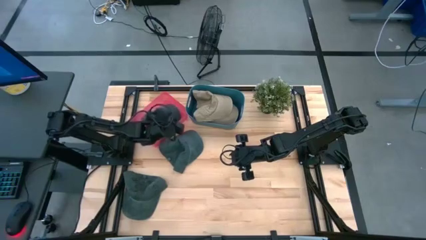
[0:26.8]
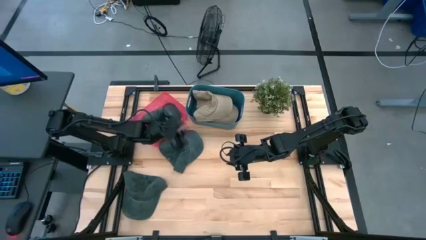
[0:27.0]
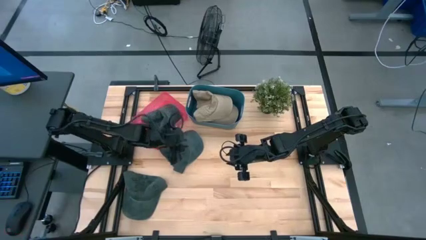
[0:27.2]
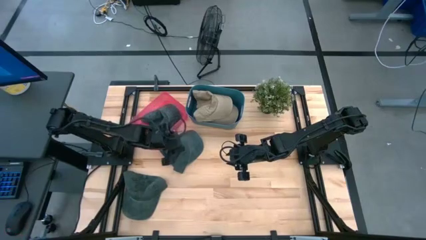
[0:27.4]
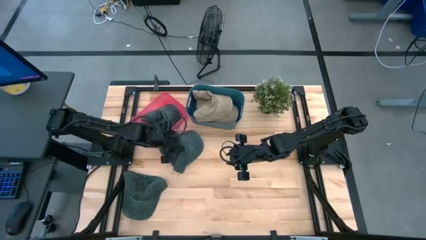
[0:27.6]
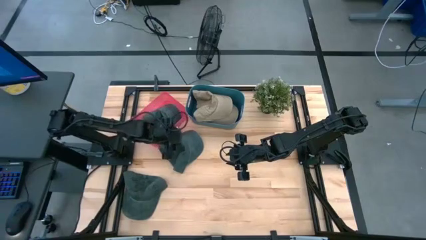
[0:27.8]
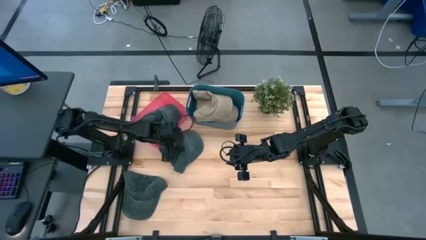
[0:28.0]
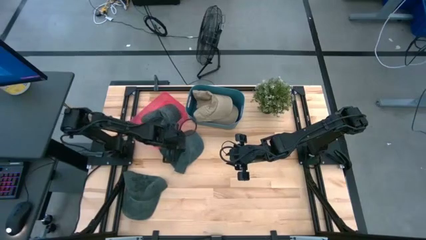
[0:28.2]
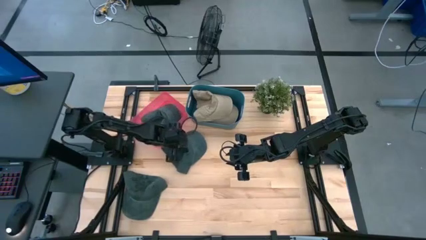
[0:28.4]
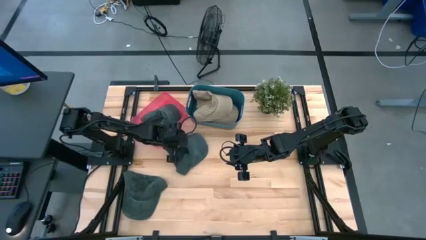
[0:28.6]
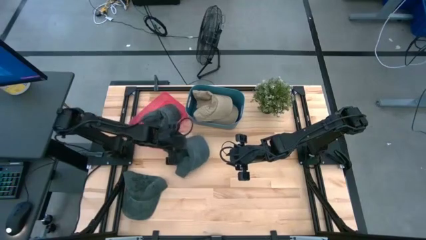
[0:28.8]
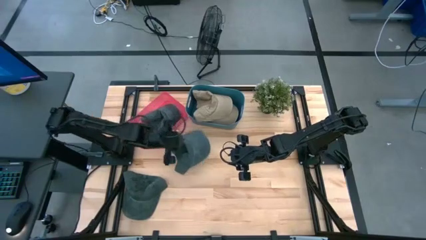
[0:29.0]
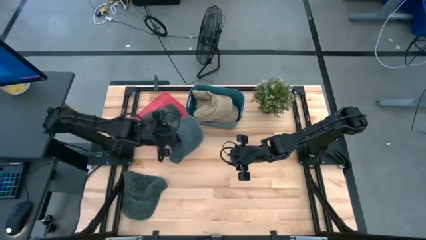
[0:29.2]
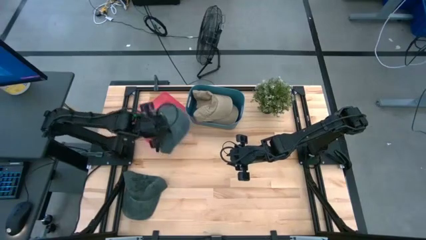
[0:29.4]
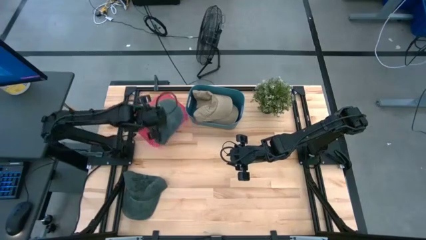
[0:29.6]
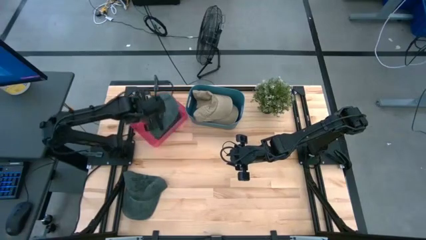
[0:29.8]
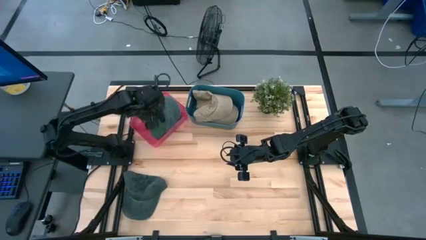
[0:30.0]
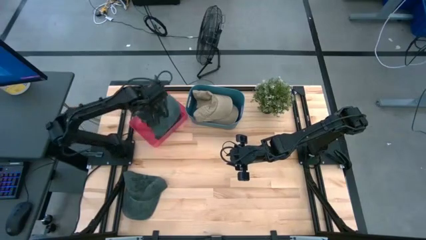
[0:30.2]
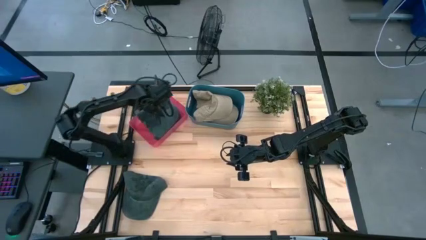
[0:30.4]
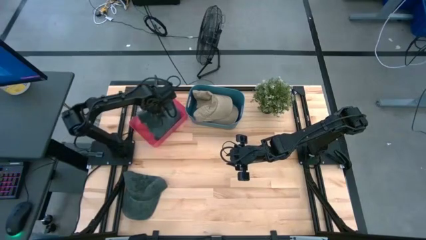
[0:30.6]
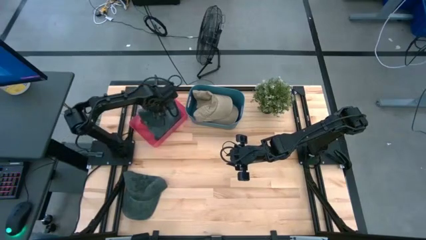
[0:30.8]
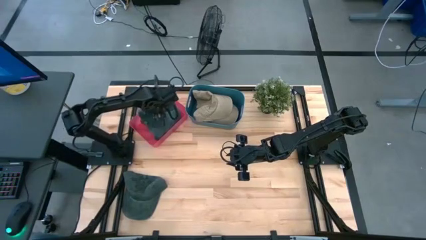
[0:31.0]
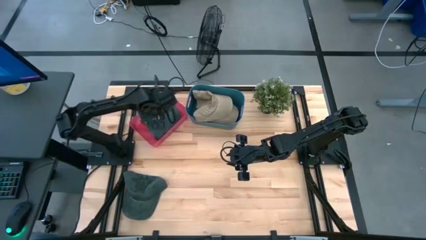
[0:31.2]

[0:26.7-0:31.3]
Task: Pick & Place hat
Put the top black cap into the pink bin

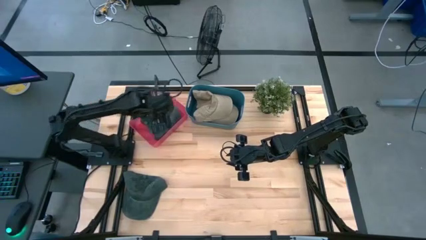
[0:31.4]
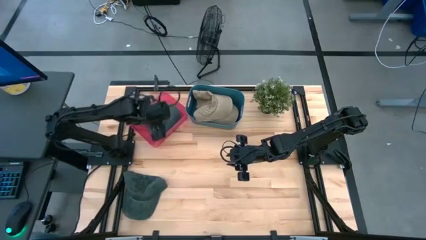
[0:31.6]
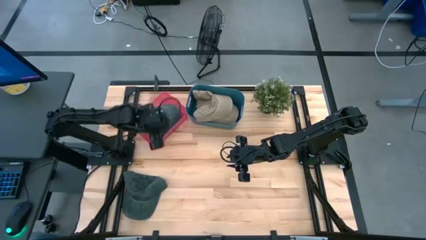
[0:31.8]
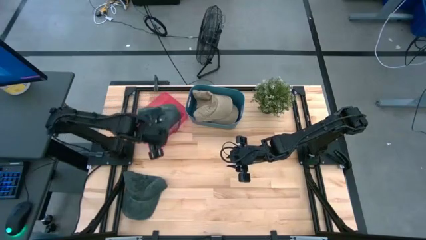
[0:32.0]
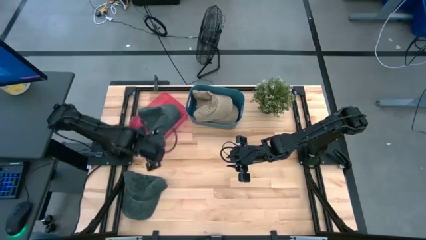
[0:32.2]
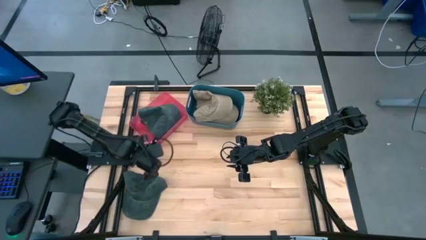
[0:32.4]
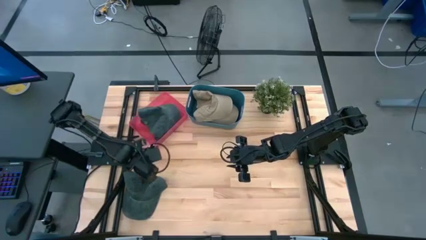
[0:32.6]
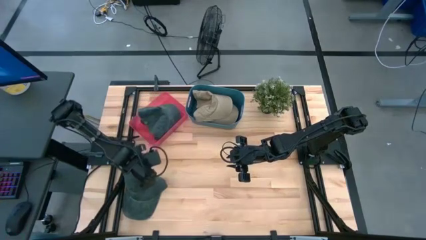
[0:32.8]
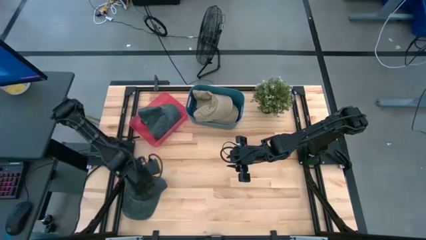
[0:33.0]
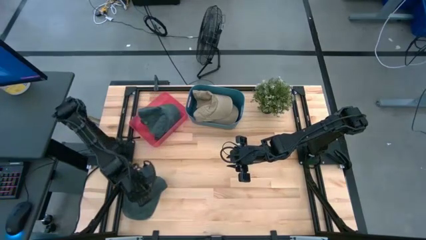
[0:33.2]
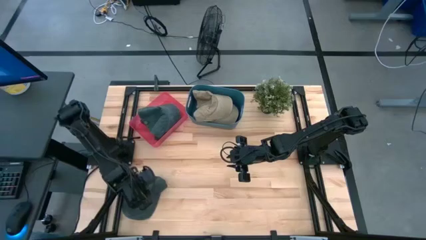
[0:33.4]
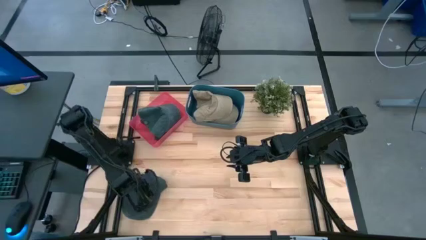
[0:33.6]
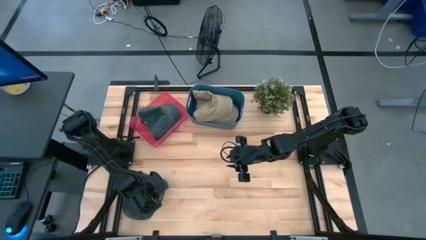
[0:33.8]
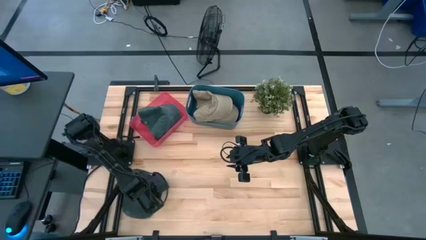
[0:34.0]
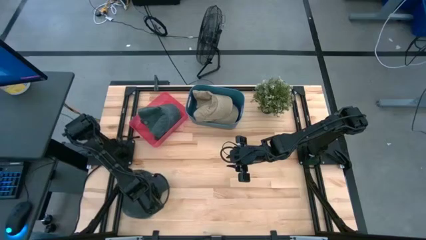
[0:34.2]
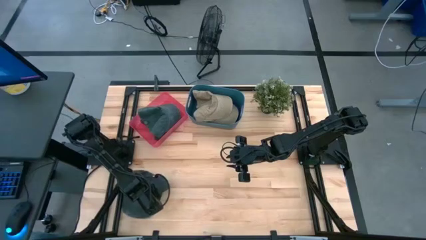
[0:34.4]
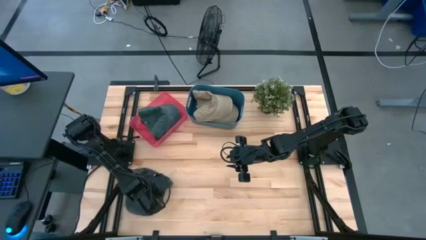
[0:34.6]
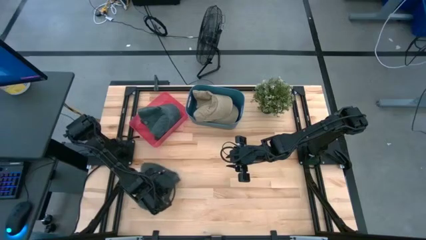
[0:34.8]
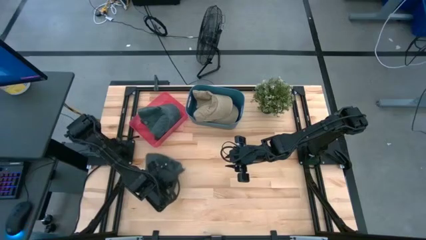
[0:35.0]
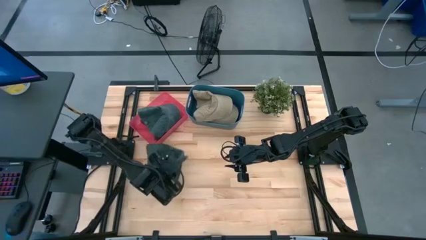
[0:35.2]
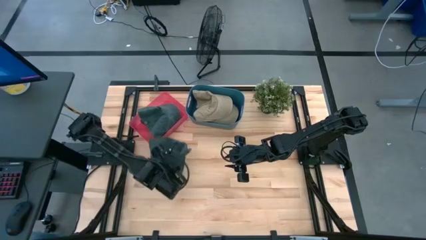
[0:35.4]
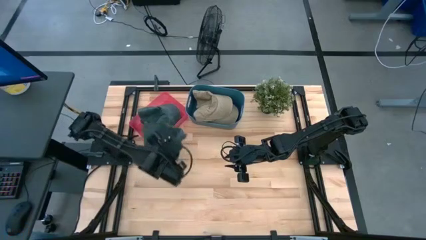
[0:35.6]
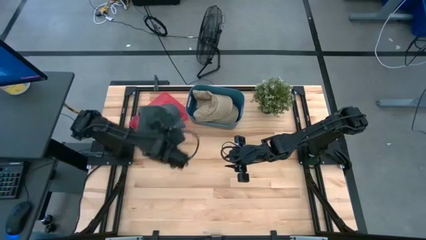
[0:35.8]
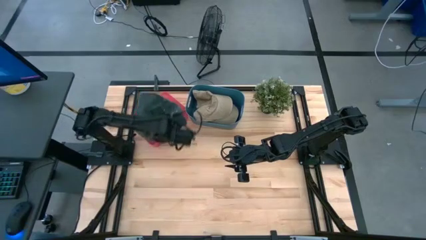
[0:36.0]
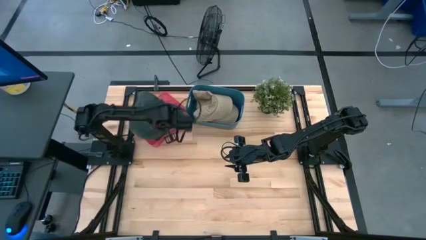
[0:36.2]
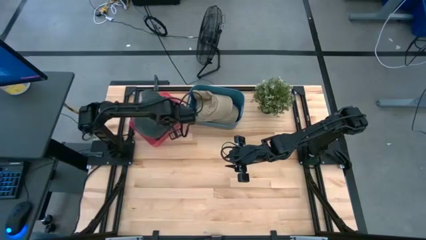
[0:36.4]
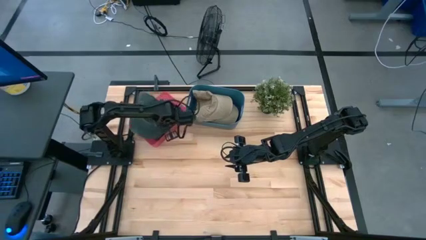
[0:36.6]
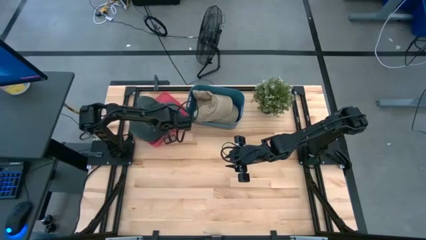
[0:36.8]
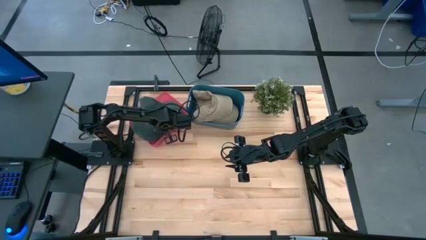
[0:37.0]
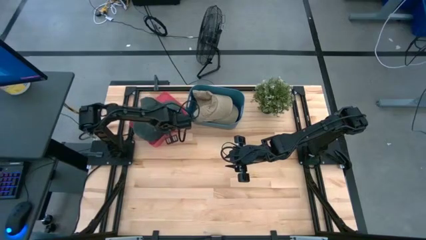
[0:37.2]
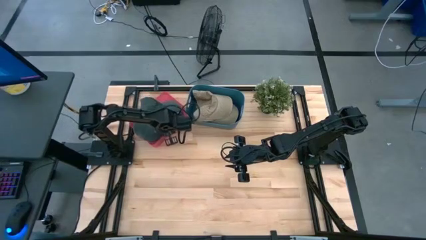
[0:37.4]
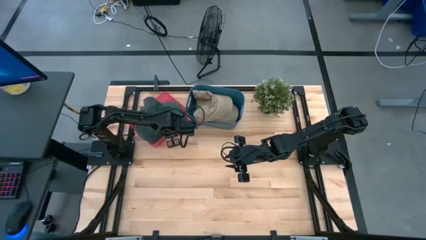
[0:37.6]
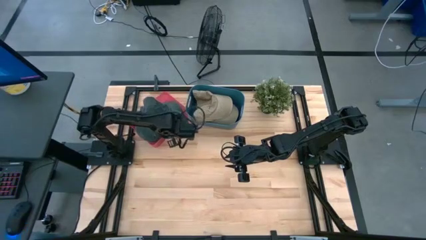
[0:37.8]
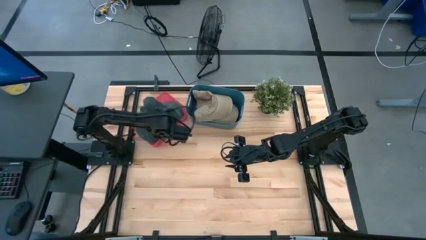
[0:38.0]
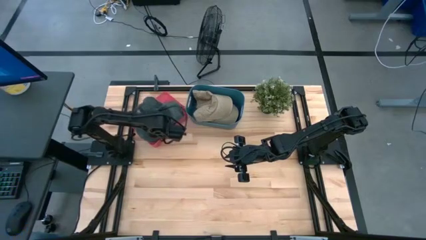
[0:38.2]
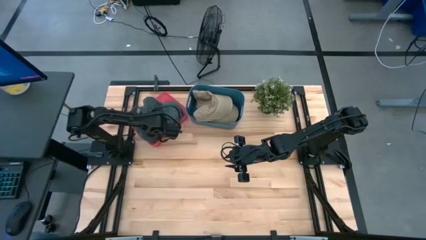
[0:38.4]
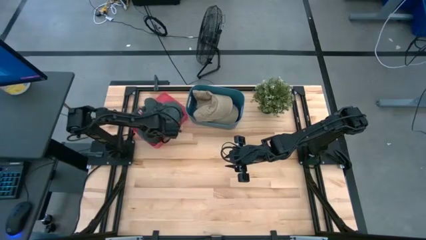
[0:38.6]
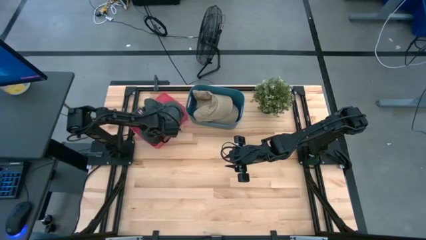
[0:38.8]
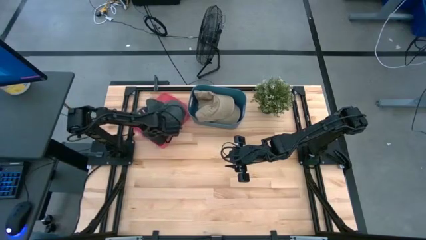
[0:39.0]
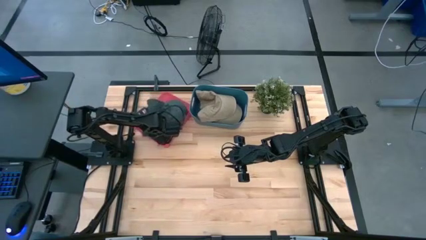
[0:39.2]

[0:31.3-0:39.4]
Put the black cap into the pink bin

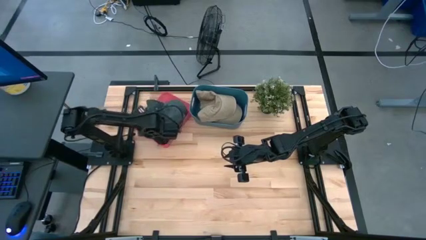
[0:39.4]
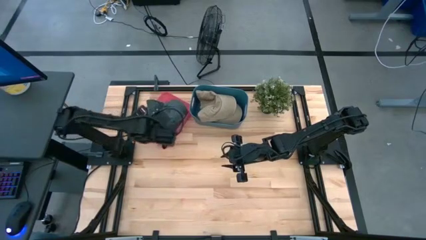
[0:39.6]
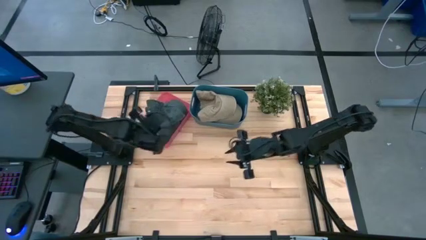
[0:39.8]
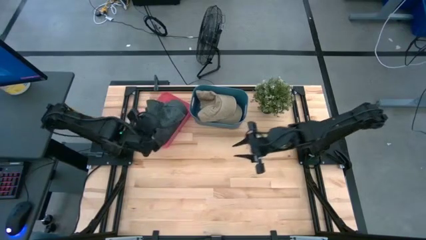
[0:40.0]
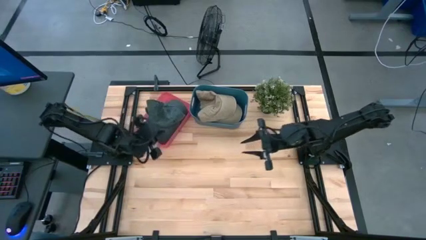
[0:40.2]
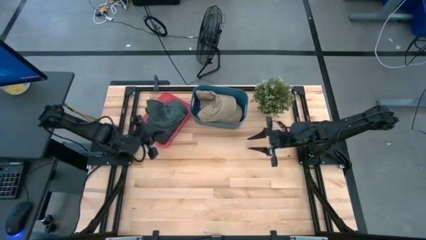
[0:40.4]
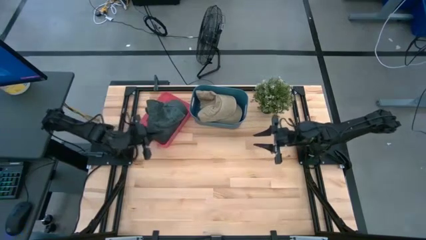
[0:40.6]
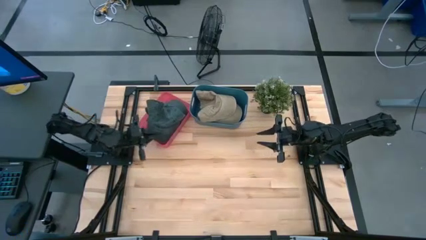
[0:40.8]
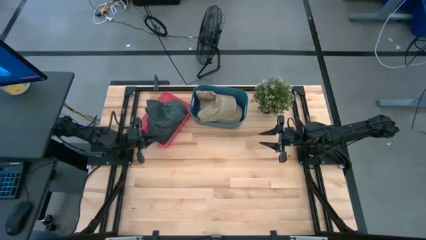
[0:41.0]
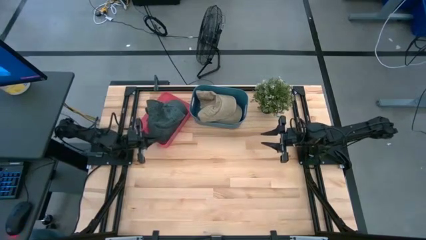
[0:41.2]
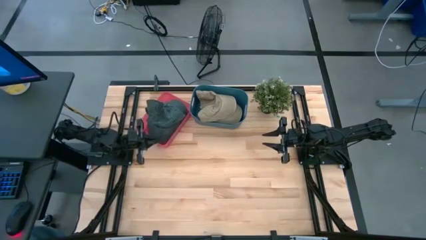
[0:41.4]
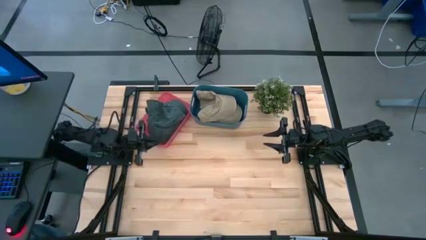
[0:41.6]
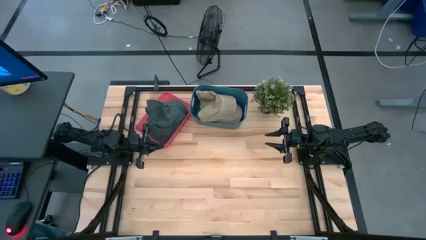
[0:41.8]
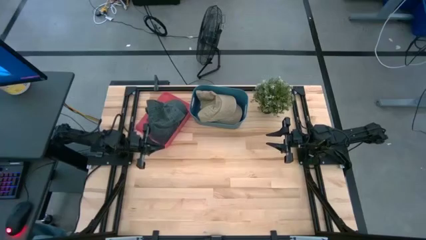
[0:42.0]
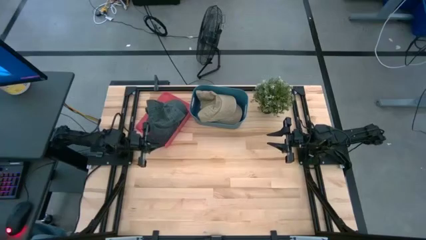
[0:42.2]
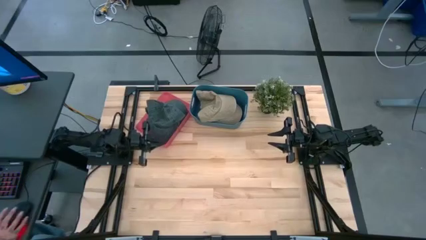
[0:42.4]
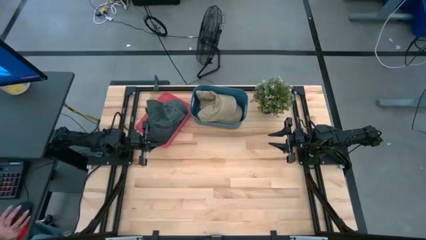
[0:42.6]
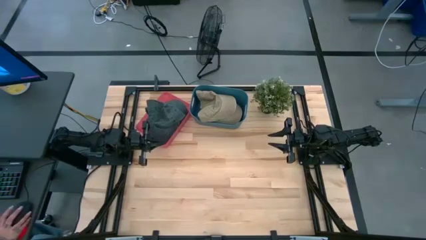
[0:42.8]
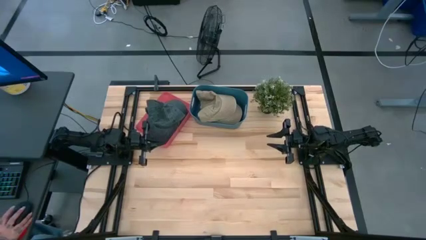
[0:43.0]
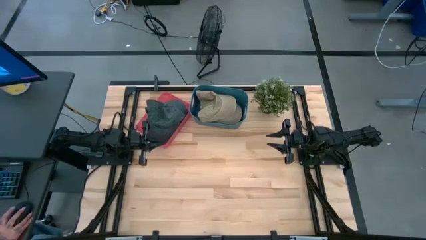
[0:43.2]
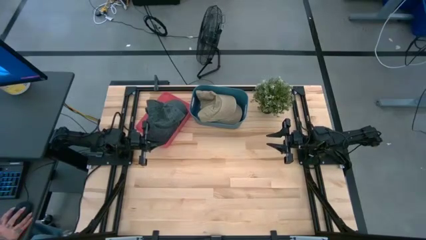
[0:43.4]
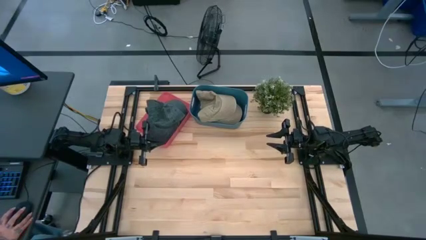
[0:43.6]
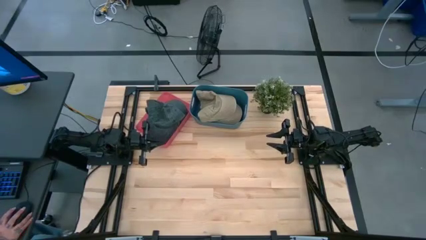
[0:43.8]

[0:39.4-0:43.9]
Return to Home Position
